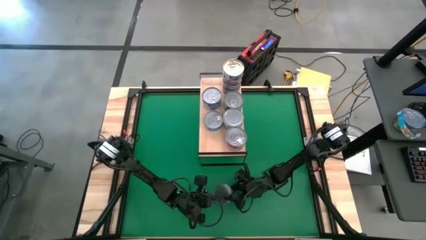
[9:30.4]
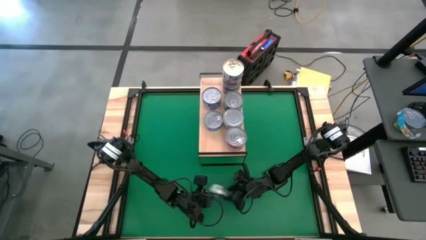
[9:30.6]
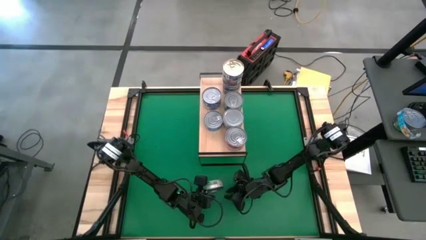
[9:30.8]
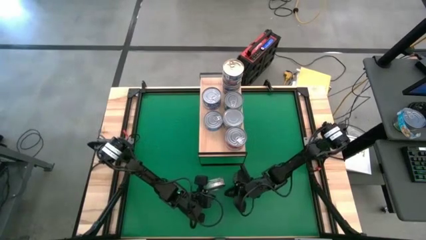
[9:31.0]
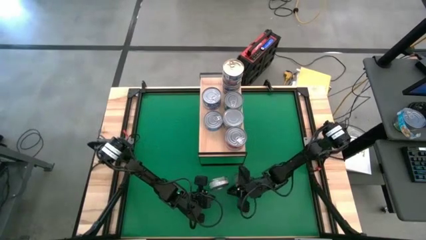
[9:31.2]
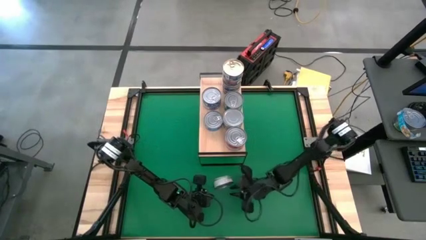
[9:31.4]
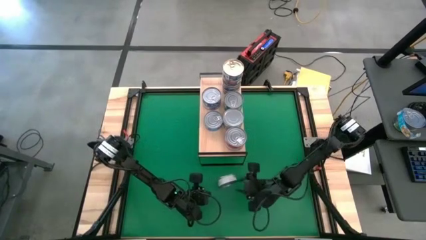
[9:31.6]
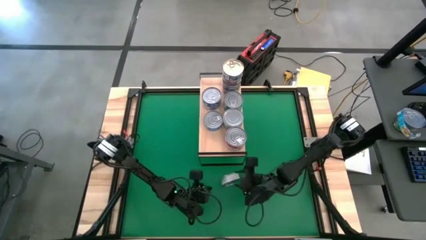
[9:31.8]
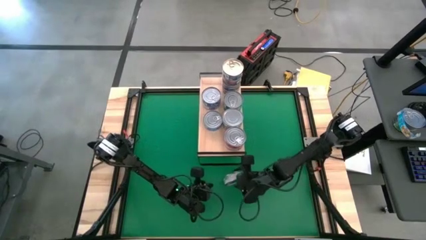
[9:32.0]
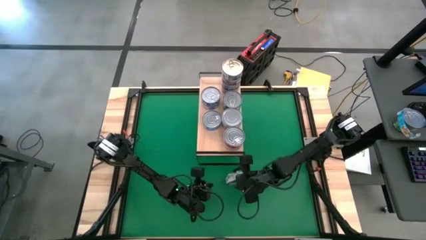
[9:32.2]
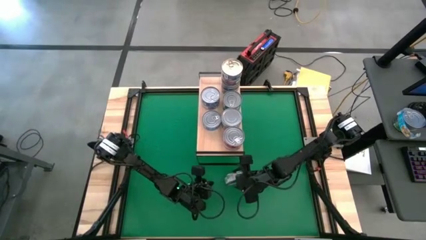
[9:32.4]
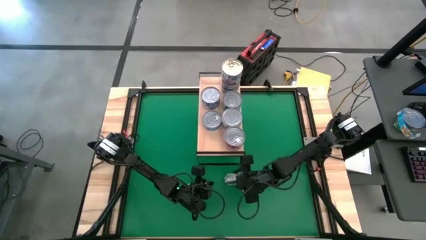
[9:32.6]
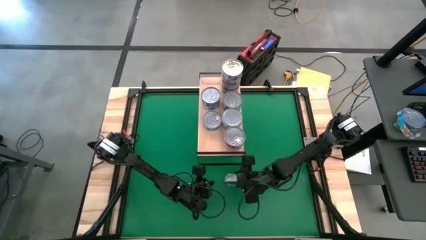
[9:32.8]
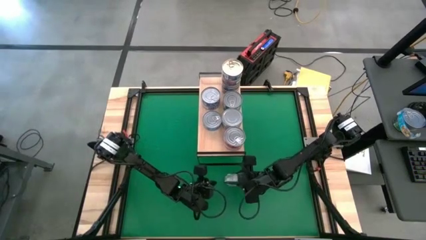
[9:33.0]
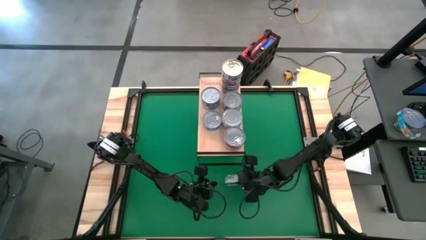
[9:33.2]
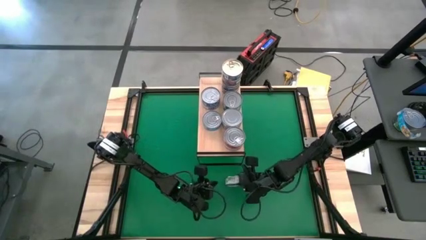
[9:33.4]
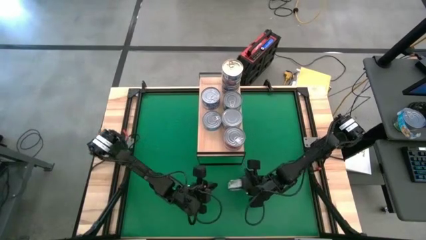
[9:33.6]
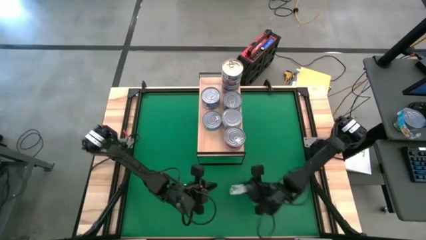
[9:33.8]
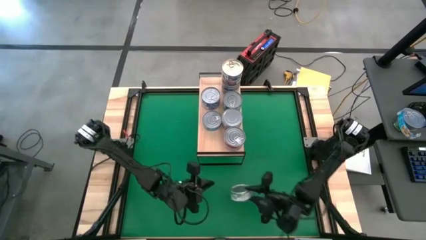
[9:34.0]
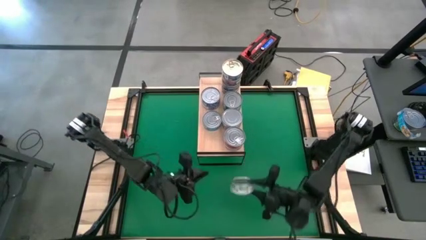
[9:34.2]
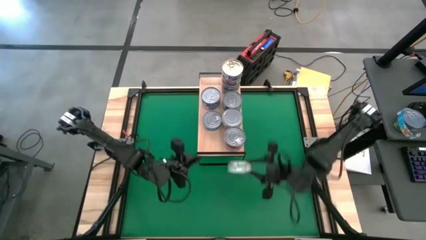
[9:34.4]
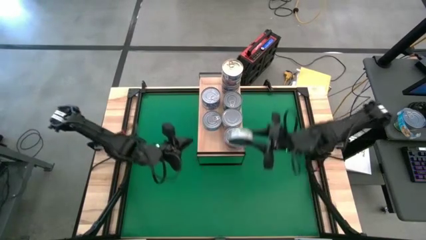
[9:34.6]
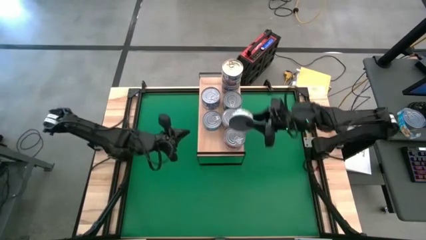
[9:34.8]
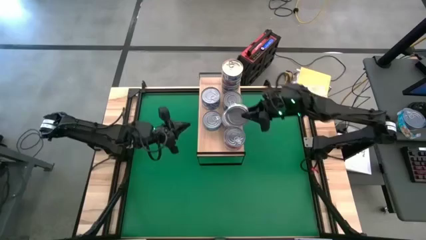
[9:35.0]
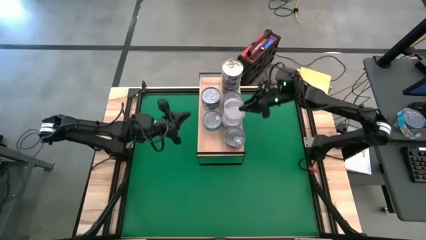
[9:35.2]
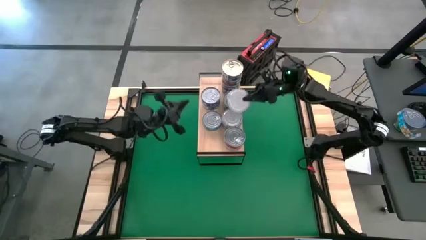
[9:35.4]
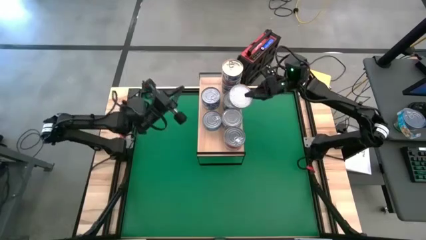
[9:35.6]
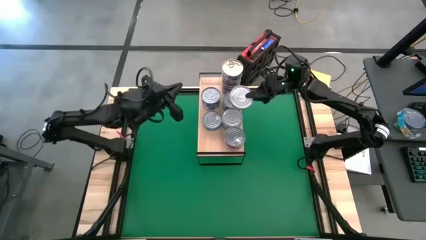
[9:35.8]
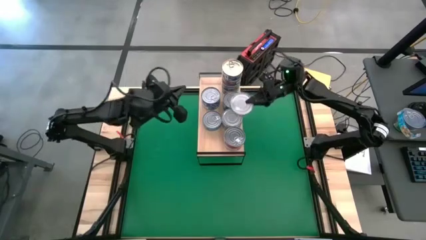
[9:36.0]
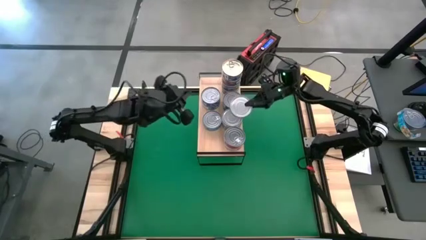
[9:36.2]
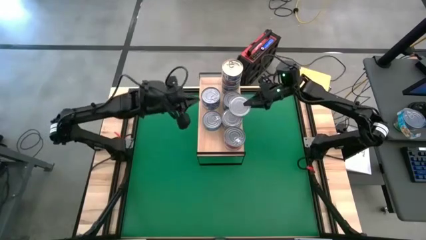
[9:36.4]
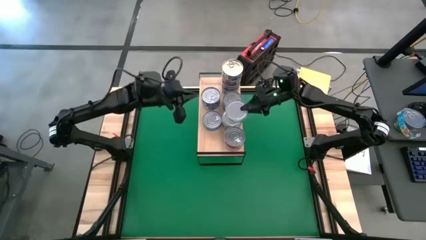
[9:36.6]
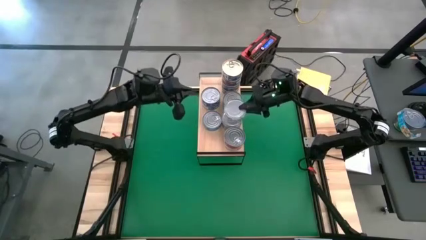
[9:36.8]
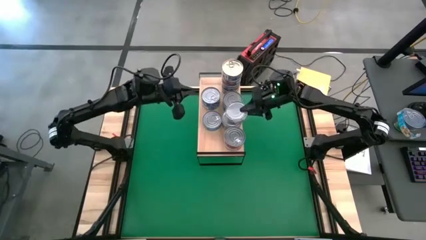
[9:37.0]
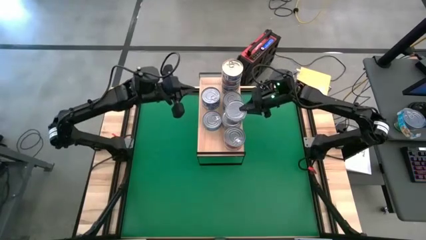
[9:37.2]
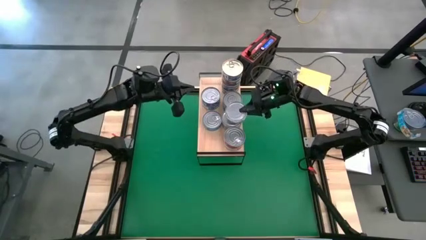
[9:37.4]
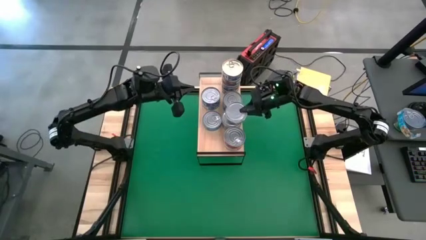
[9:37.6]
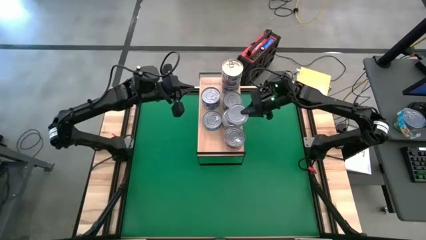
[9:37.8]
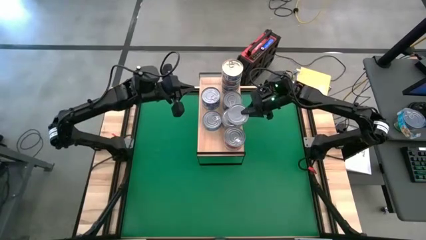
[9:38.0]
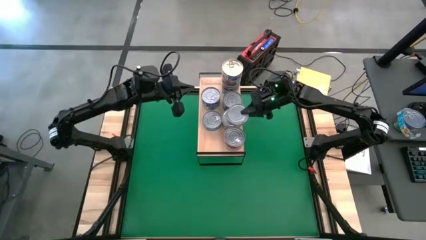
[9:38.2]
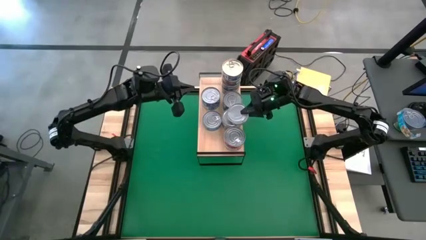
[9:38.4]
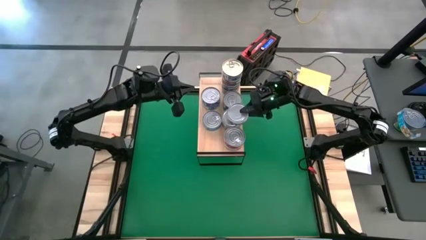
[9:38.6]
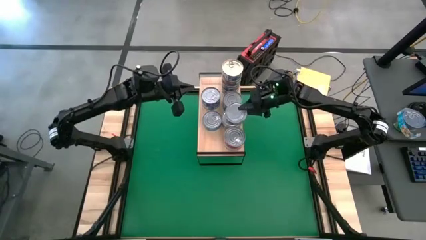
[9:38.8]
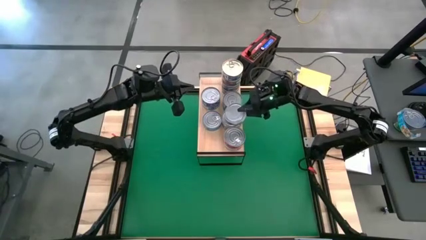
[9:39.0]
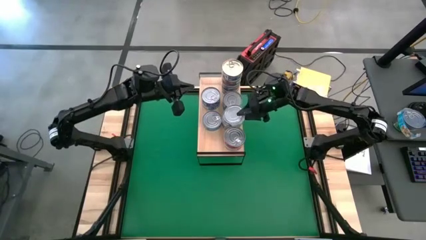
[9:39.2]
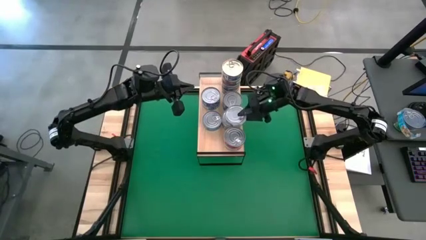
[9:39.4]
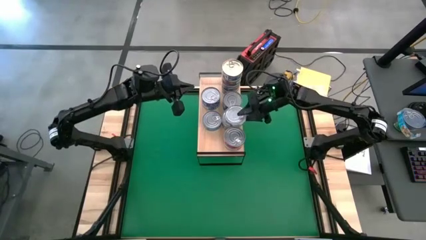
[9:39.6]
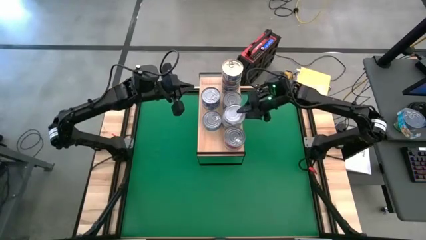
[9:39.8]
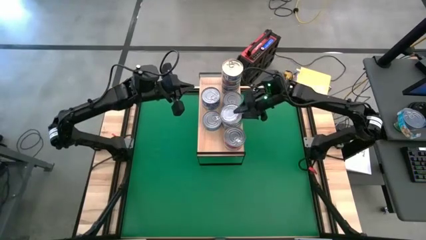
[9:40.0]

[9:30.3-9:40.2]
Task: Stack canned seafood by type on shelf
Stack the green tuna can on top of the green tuna can on the shelf

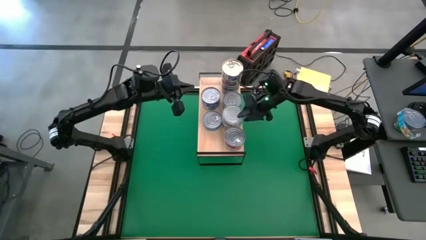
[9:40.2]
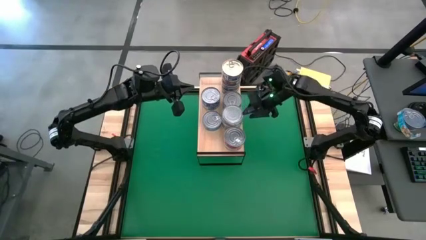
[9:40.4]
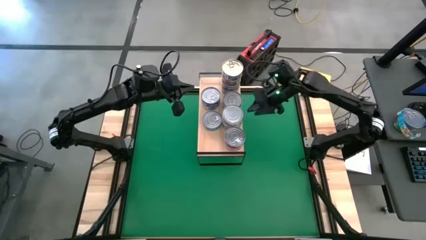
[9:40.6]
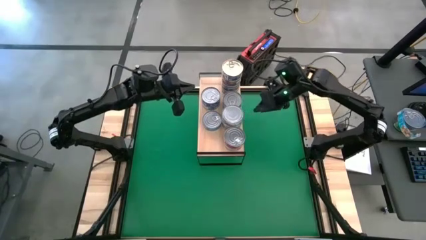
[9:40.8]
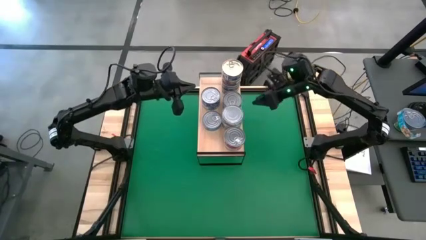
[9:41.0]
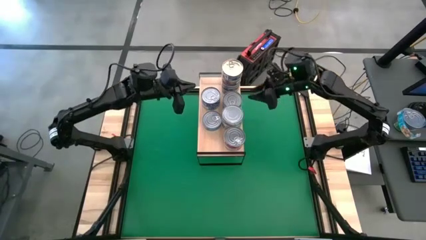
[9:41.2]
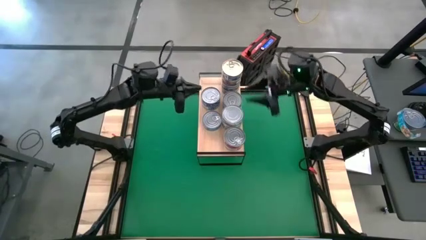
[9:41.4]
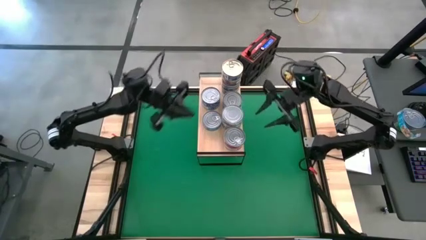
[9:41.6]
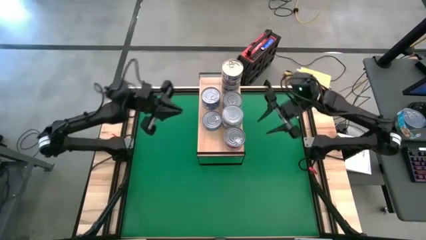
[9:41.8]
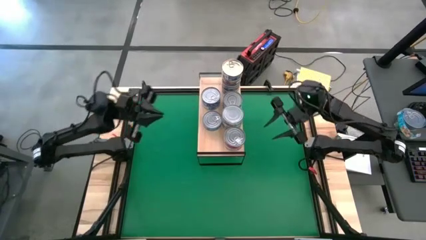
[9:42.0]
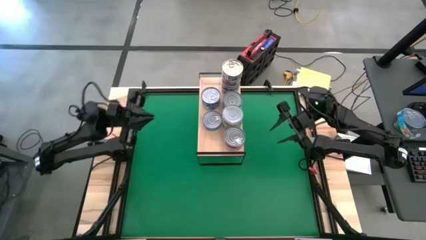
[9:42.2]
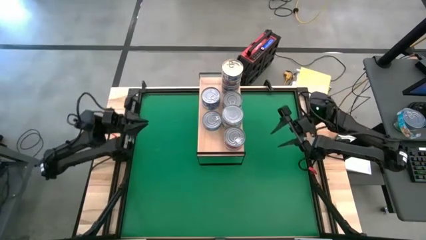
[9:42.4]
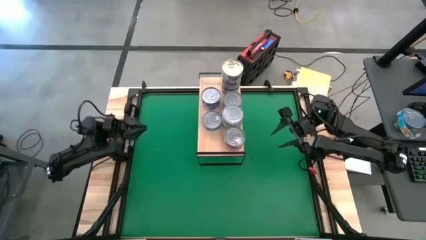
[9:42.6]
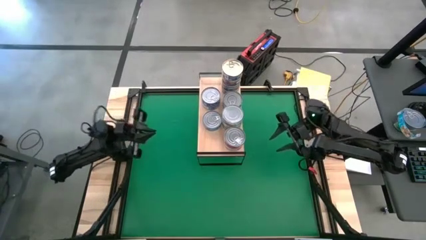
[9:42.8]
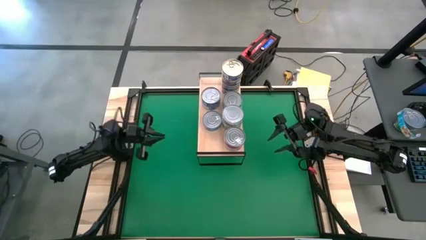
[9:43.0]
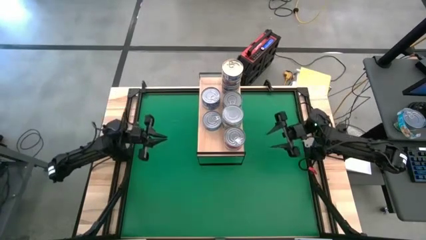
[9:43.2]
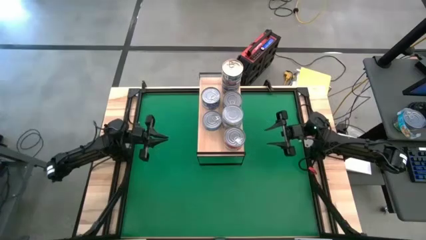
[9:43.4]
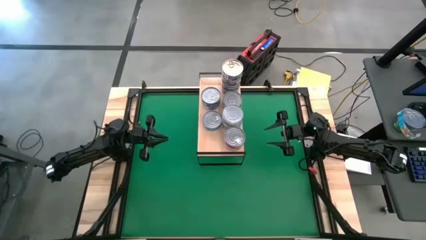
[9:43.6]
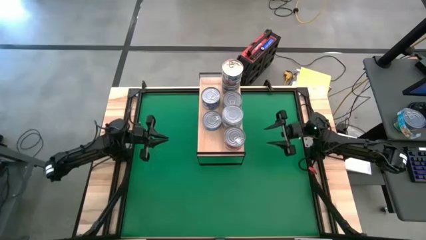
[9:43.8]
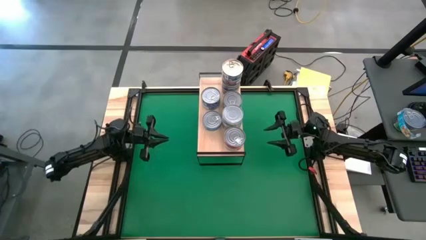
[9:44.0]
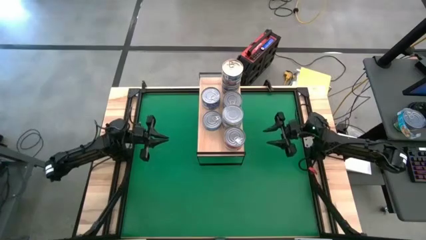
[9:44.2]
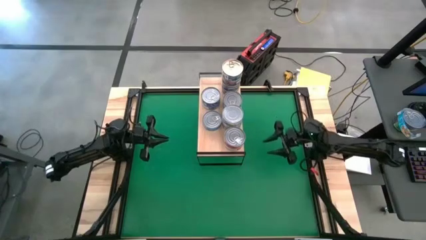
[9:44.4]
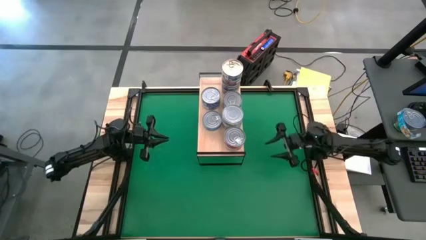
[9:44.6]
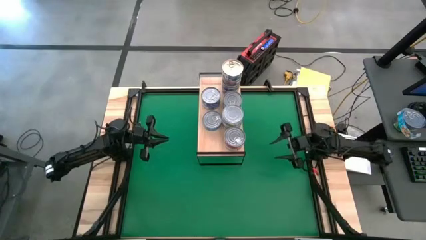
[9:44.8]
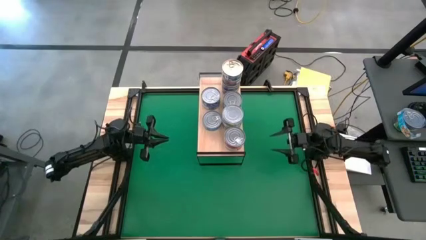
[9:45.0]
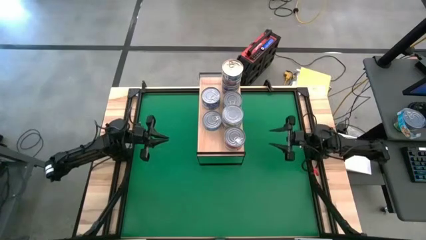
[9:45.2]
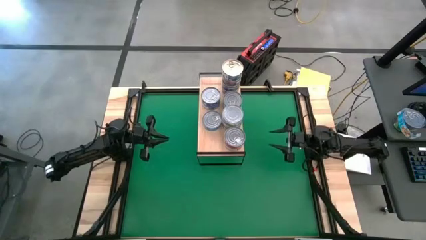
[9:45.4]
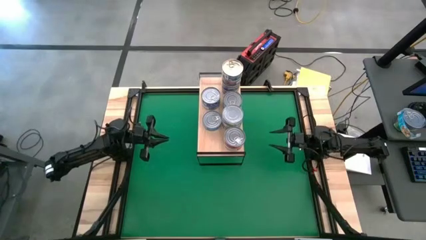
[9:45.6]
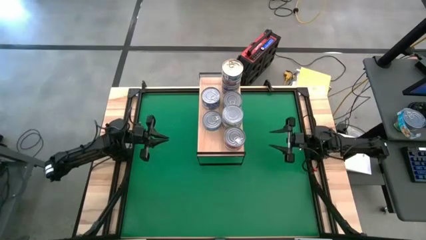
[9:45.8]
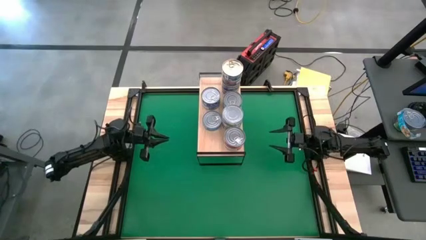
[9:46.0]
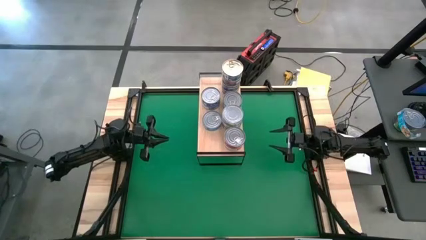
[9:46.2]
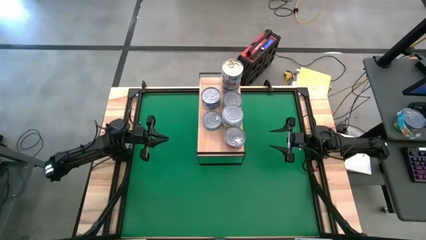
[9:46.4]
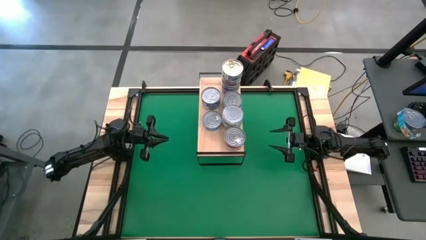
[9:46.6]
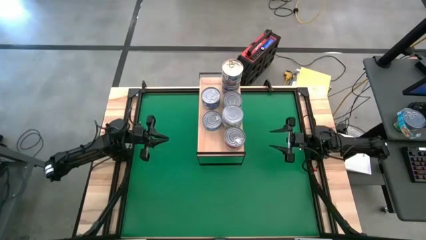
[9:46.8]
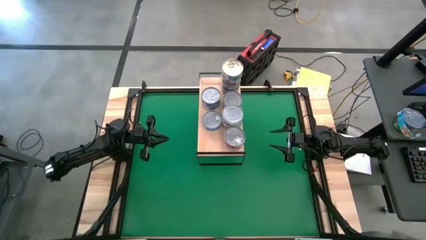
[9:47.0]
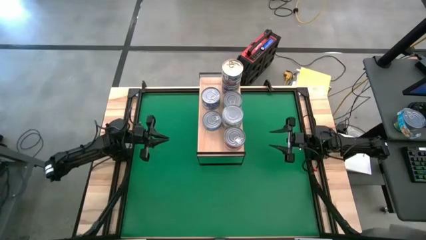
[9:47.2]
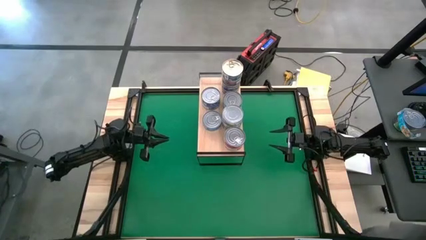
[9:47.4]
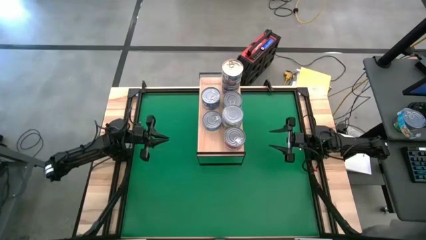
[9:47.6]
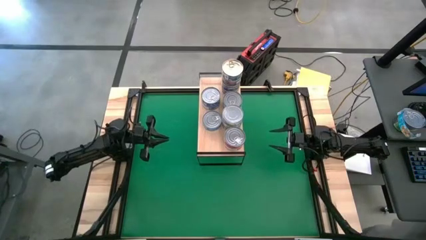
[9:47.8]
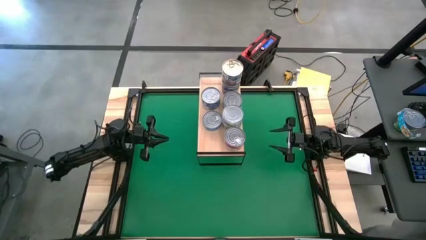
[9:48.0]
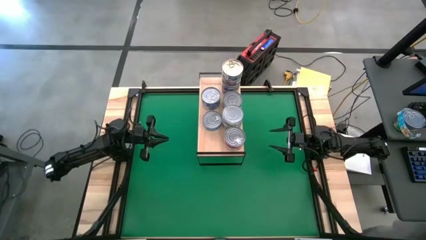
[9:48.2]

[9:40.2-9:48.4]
Return to Home Position
